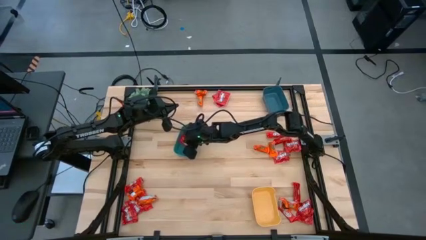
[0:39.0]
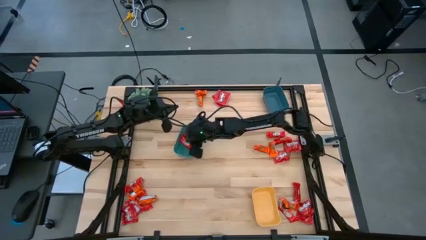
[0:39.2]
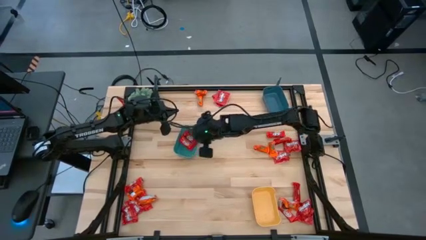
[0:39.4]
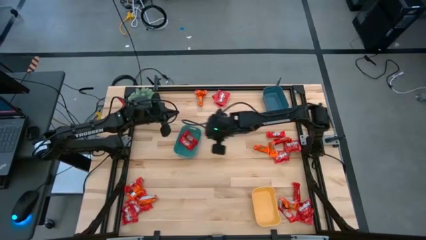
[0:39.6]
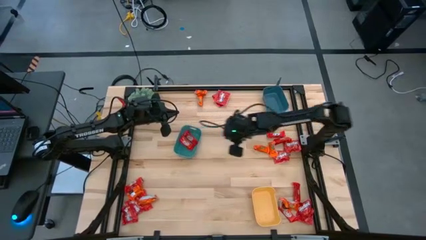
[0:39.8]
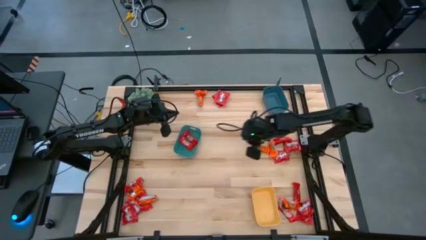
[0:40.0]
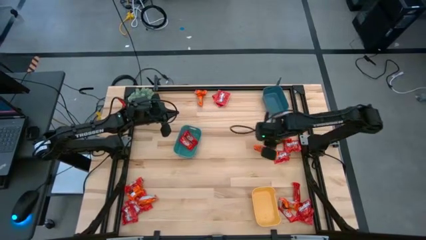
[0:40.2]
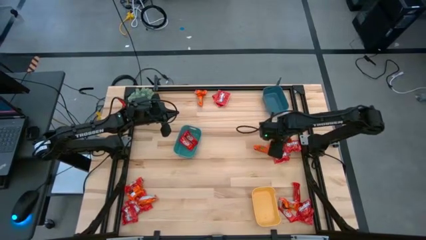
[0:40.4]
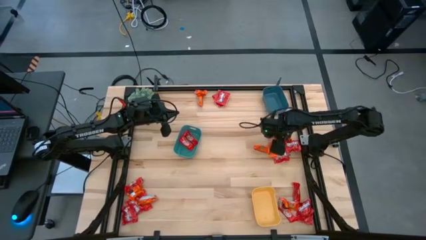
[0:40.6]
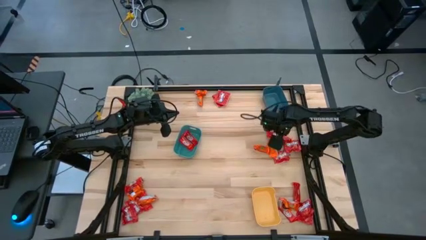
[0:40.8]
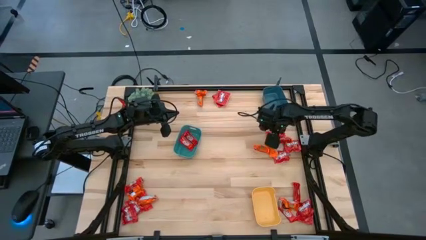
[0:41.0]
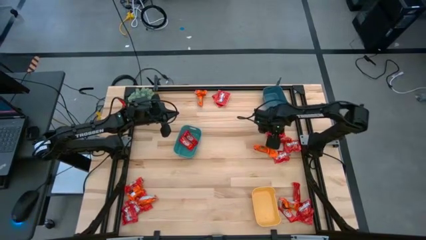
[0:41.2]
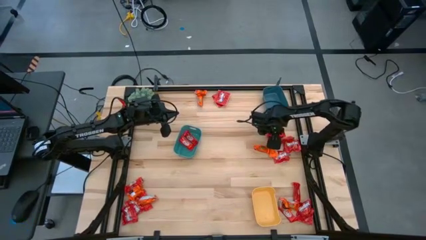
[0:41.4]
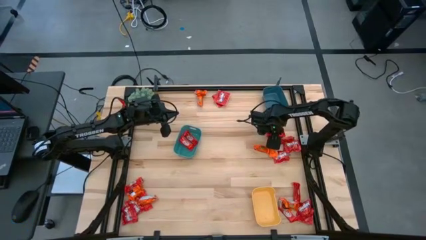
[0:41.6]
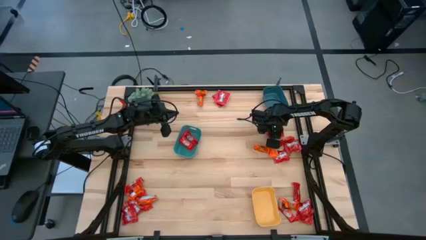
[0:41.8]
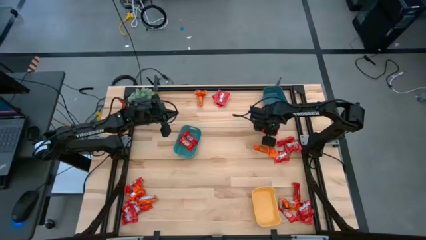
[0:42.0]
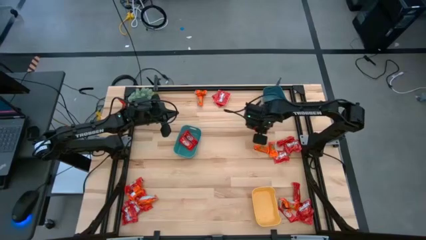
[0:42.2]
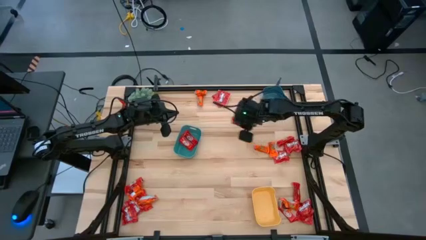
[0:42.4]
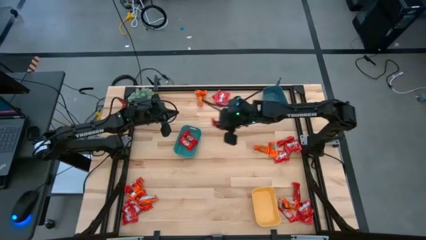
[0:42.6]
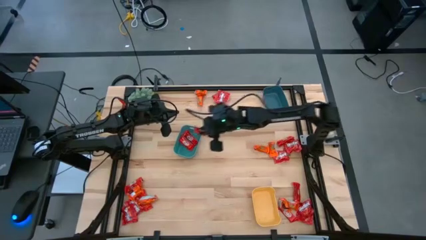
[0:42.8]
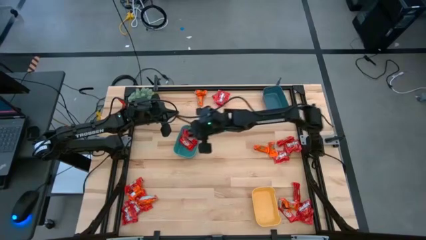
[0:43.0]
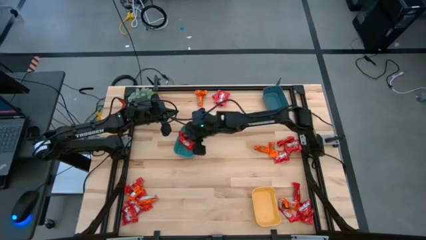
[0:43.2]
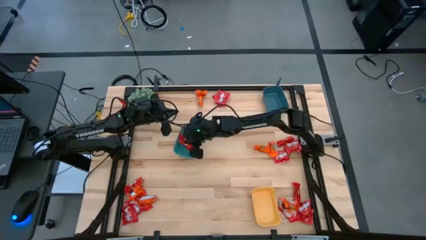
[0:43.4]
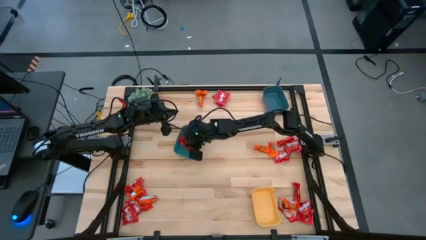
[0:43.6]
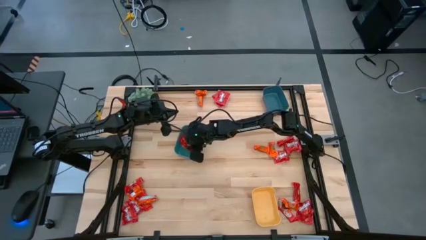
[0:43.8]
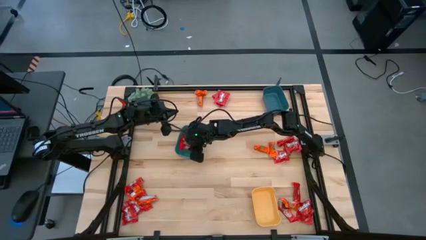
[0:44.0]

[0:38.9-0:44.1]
Task: Sort candy
Put the small red candy into the green bin

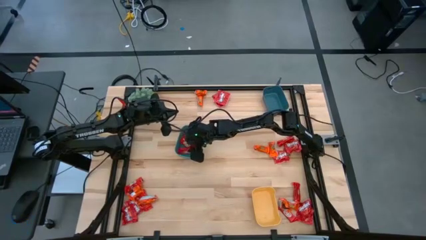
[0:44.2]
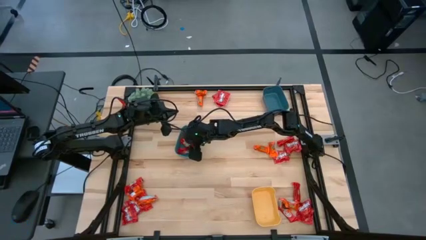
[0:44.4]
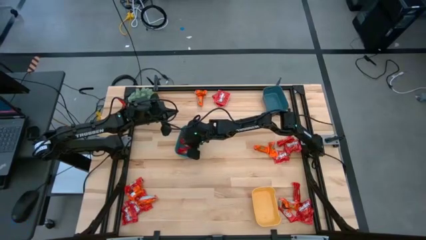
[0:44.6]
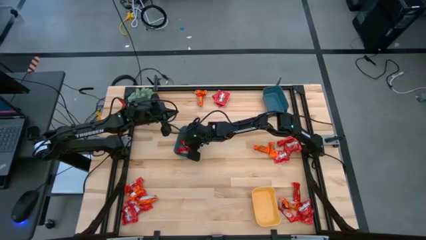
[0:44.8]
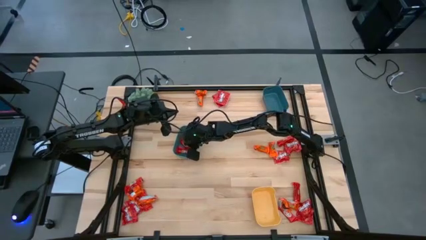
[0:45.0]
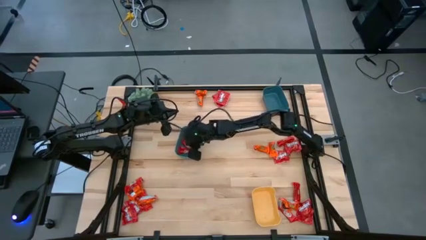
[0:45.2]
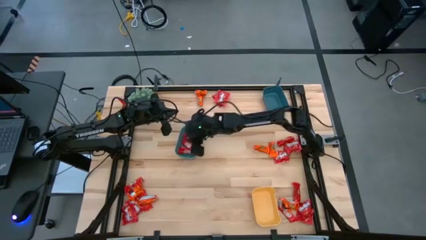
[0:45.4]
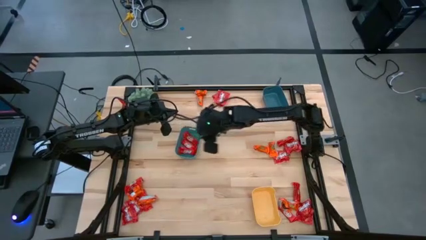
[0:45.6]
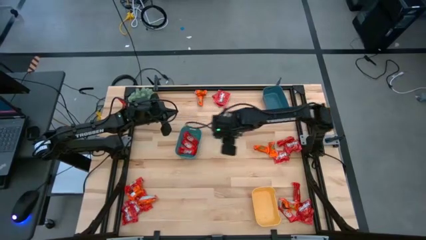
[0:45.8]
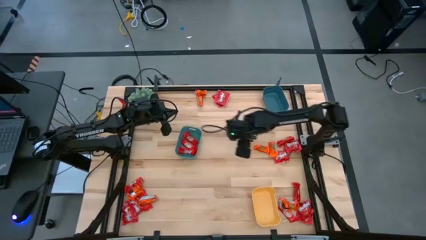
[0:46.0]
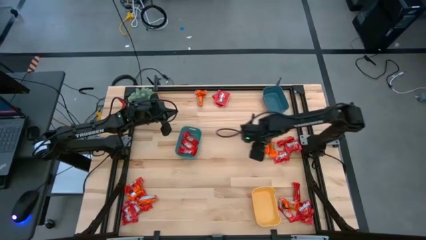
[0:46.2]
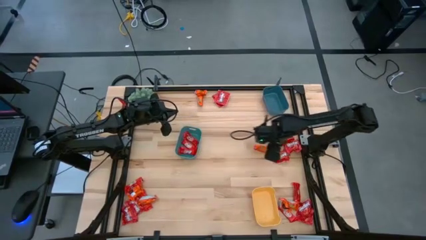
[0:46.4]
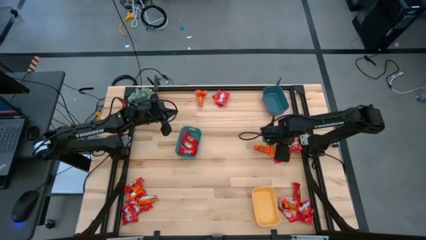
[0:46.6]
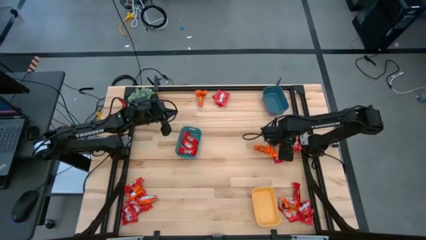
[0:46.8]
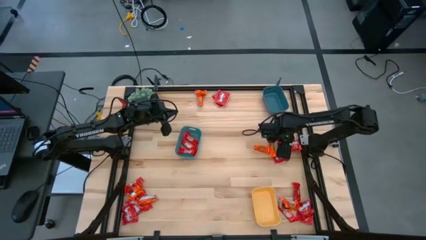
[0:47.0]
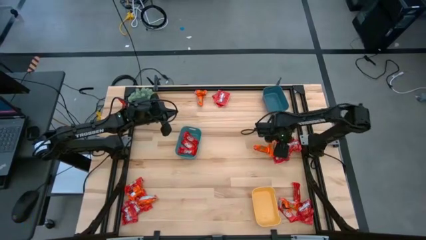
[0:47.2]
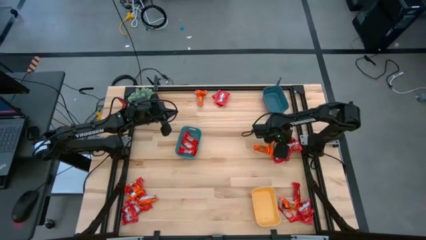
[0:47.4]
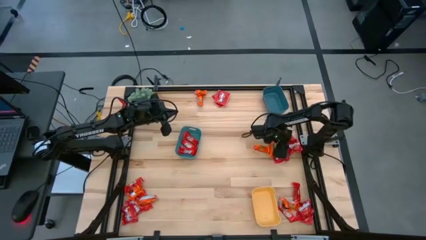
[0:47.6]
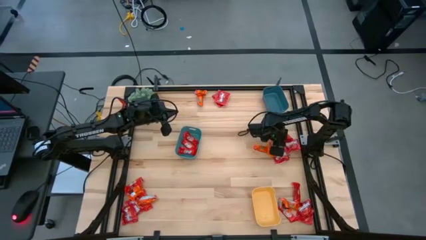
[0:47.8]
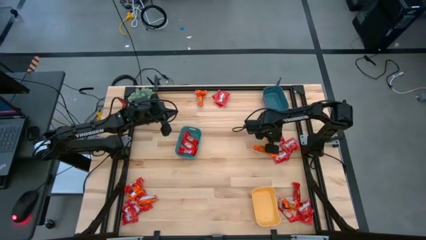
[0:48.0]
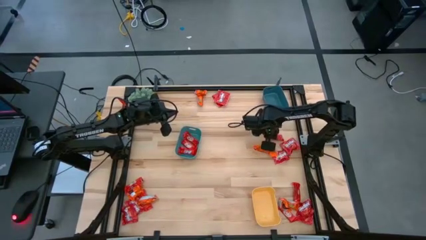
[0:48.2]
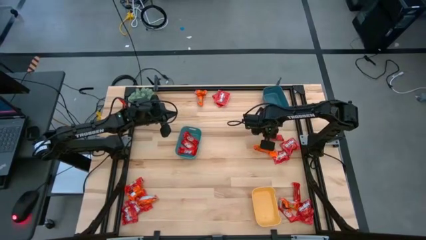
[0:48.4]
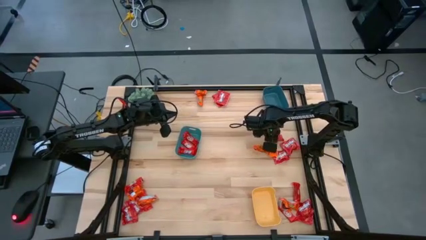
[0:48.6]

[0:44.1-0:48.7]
Put the small red candy into the green bin

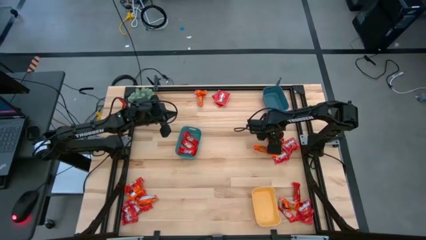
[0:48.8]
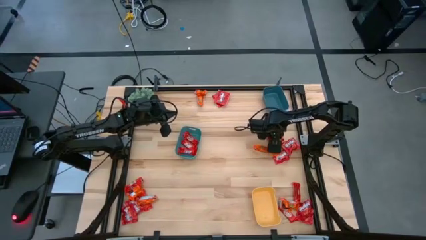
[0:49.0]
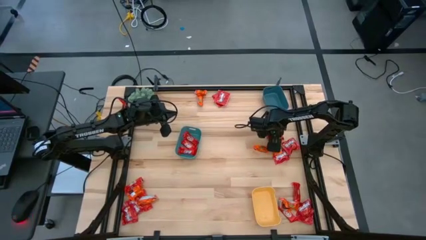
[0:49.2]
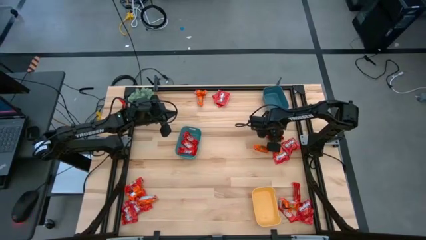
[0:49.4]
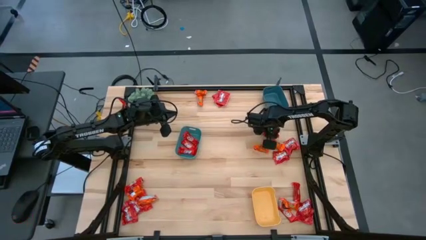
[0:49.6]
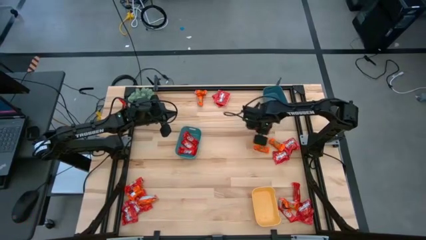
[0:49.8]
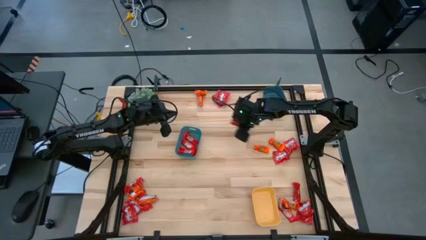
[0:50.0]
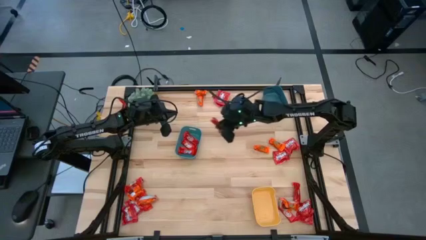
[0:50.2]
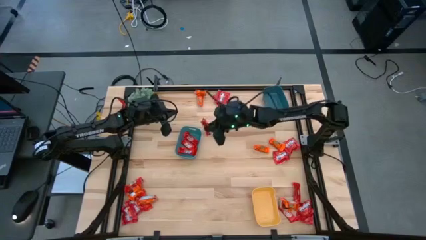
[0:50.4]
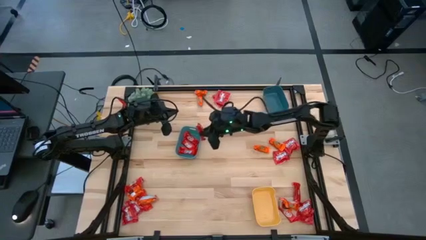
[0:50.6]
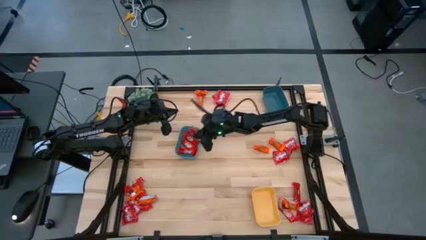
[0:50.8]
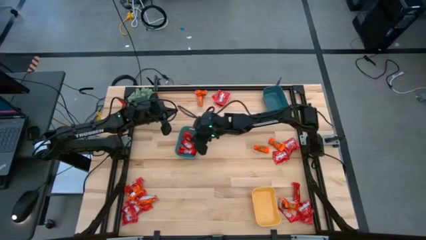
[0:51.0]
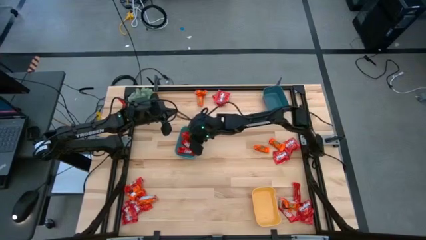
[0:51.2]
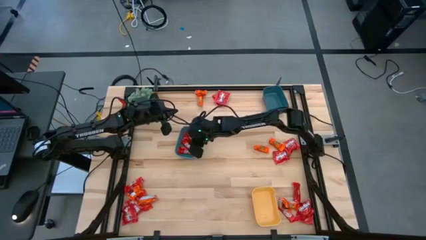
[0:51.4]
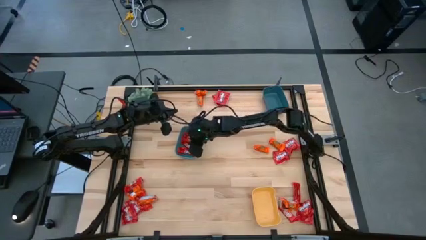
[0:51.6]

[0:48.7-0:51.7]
Put the red candy into the green bin

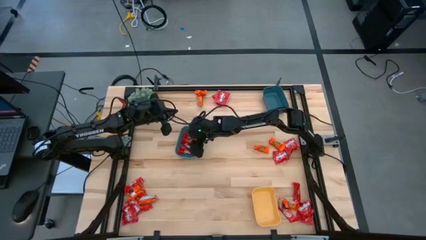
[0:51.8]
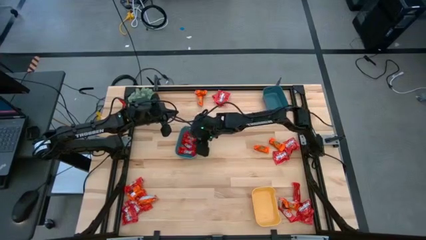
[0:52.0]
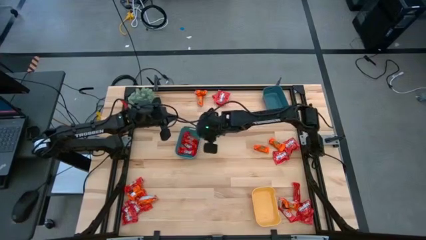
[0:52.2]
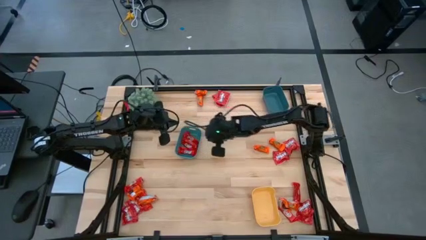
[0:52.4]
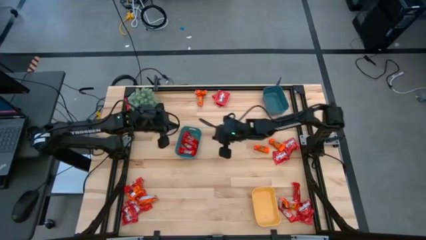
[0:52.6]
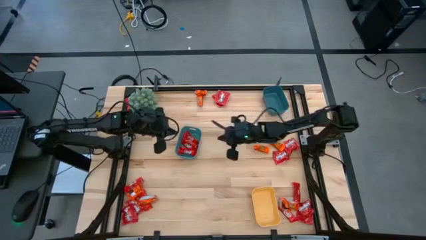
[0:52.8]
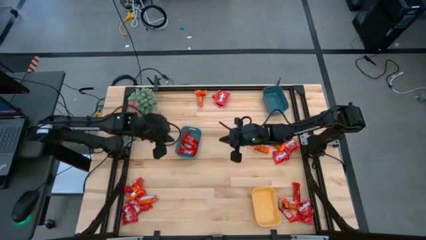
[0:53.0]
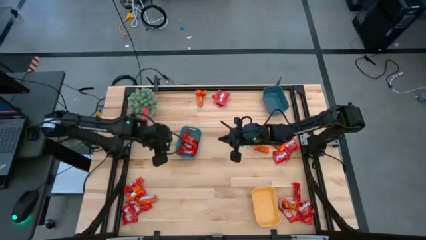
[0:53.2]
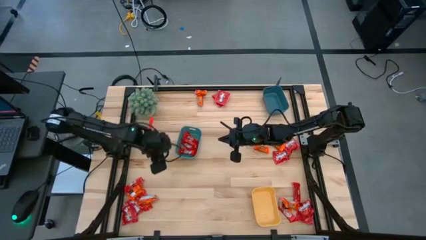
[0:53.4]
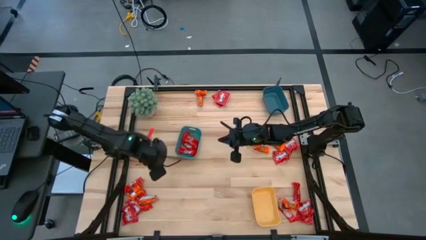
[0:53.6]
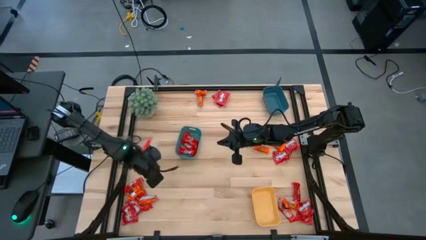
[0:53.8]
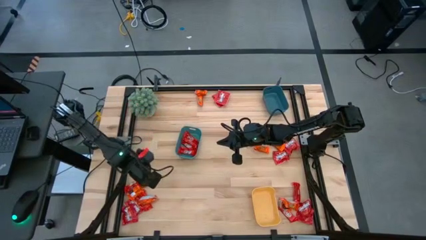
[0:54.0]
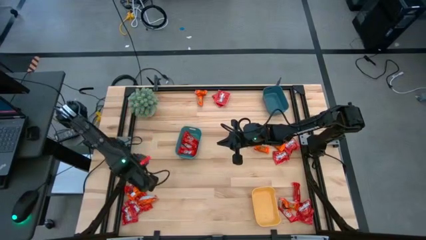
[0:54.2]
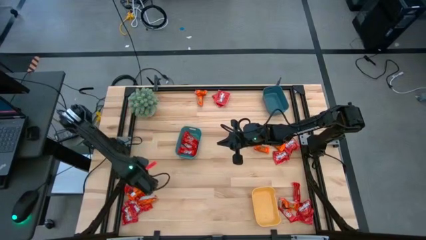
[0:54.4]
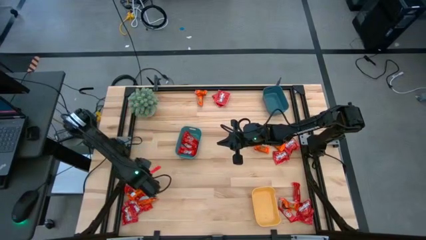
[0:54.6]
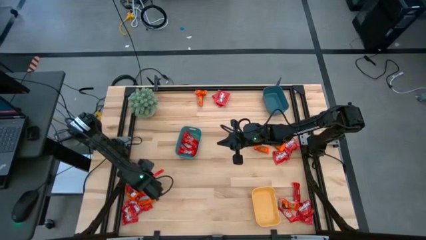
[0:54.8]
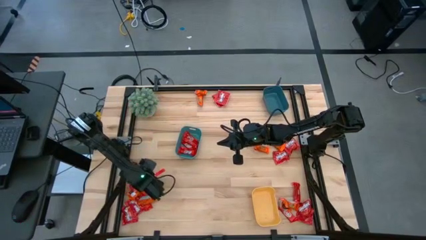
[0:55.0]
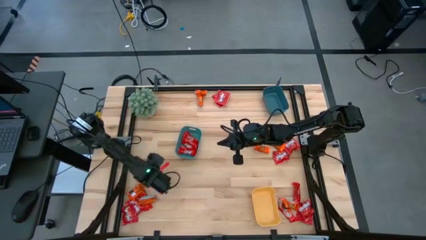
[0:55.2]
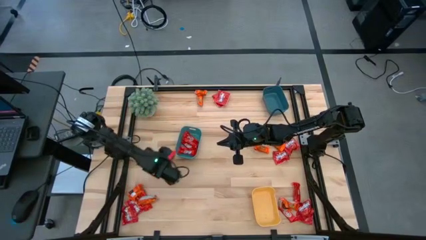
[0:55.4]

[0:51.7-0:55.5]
Adjust the bottom left candy

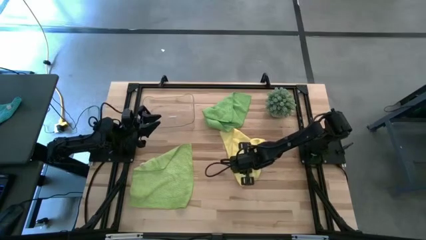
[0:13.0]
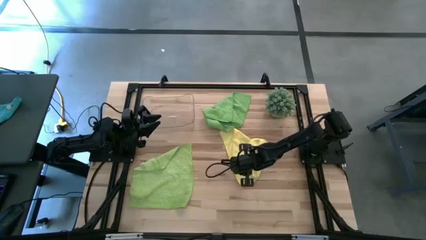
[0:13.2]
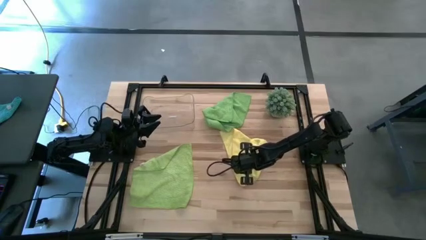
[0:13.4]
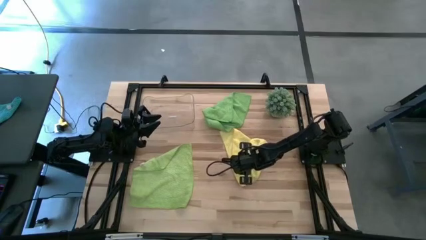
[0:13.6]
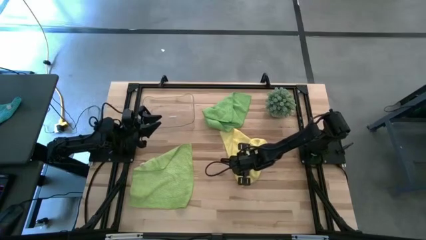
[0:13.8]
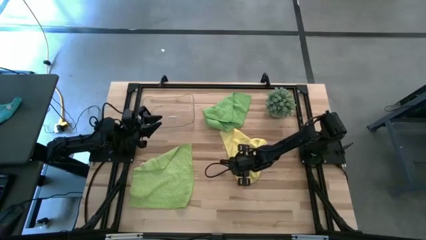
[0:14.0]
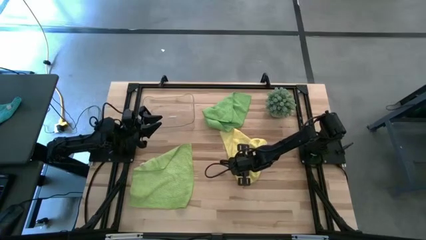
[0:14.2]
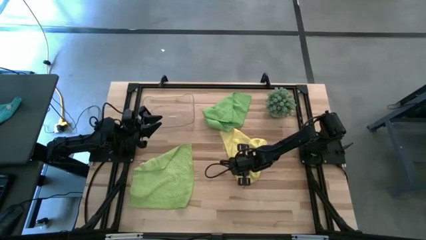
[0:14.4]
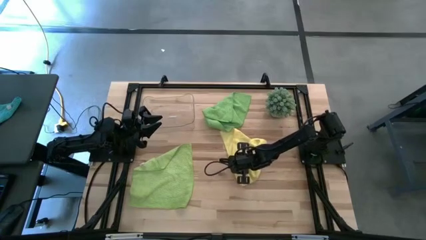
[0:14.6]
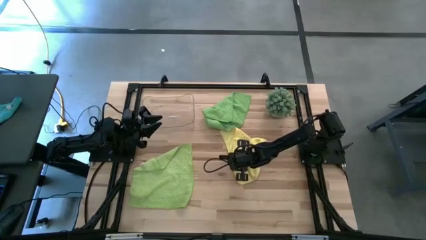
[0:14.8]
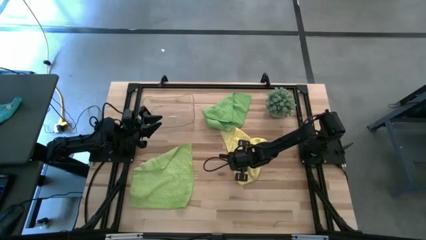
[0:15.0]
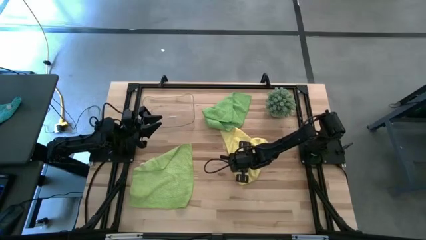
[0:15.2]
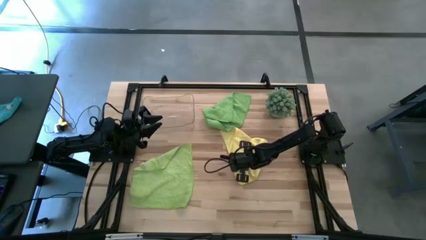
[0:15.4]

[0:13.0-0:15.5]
Task: Roll microfiber towels into tight, uniform cylinder then place into a basket
Fold the yellow towel
